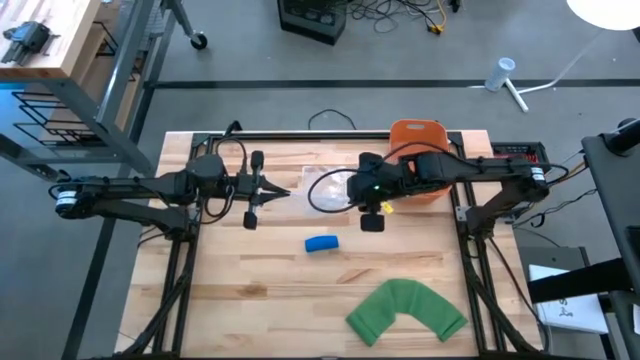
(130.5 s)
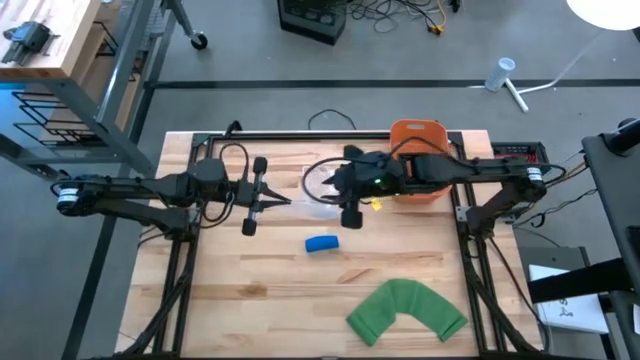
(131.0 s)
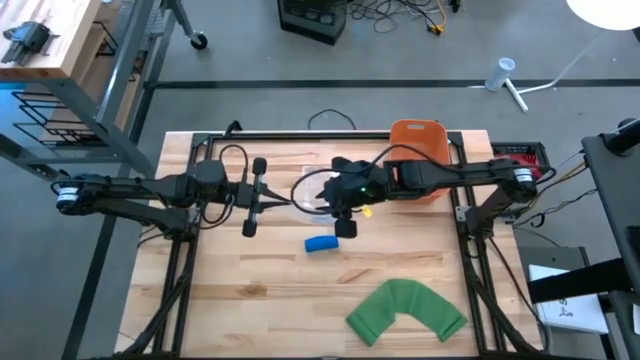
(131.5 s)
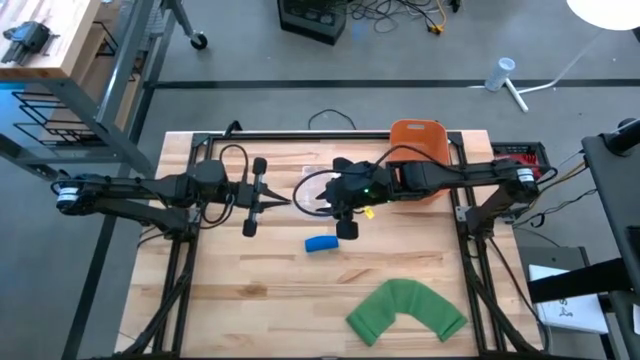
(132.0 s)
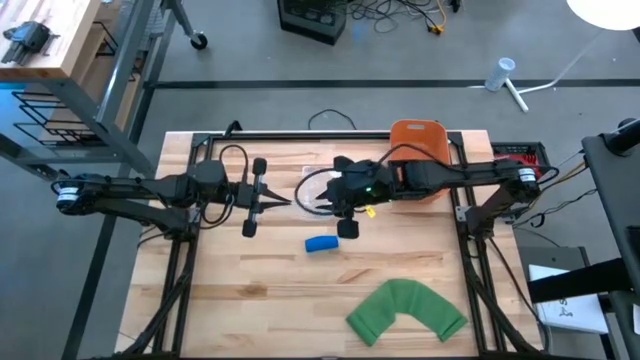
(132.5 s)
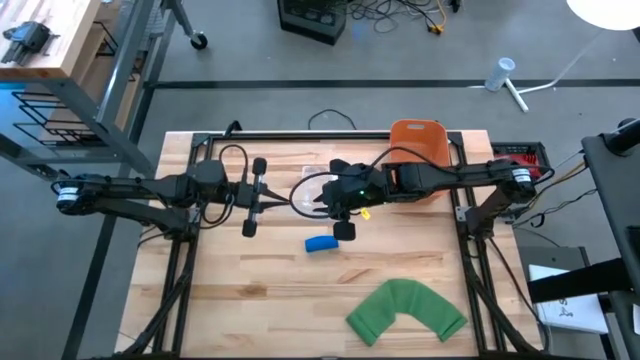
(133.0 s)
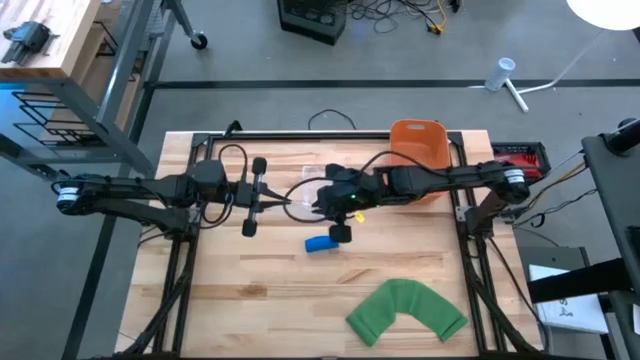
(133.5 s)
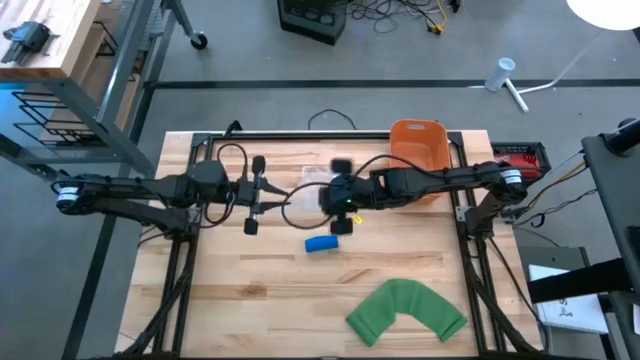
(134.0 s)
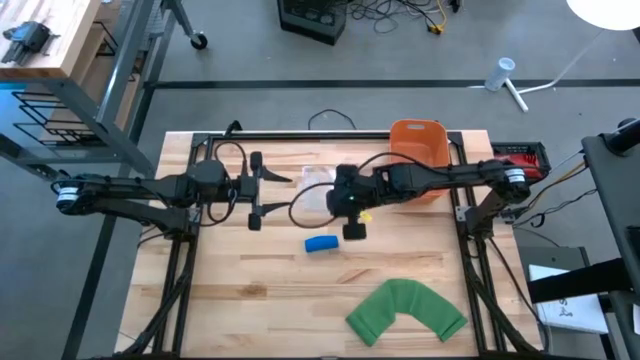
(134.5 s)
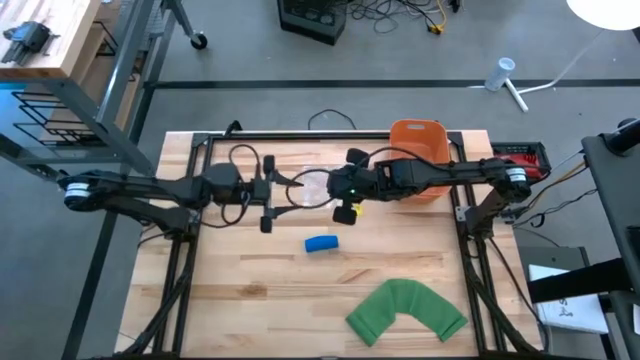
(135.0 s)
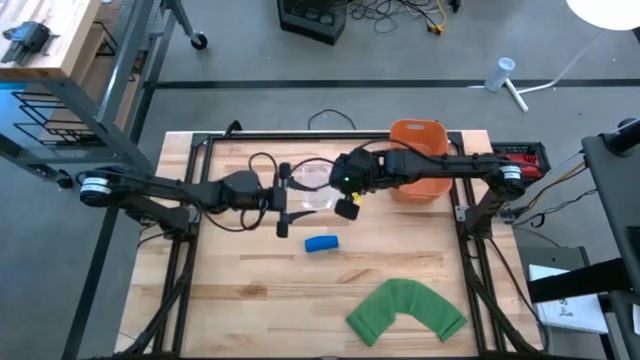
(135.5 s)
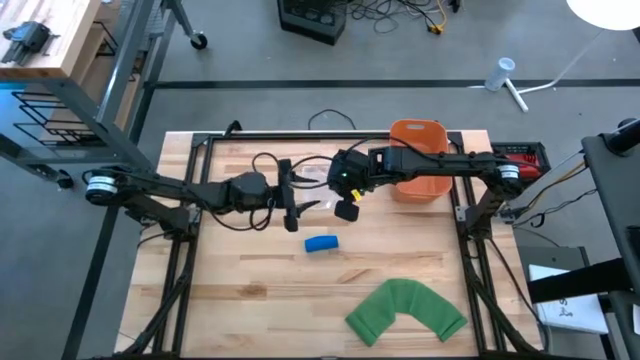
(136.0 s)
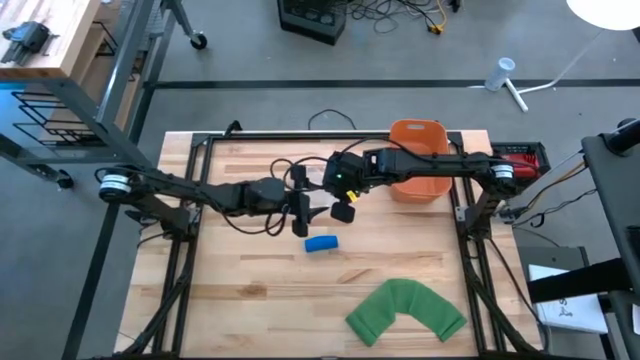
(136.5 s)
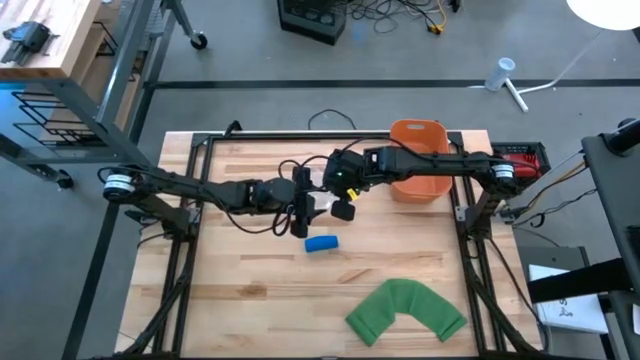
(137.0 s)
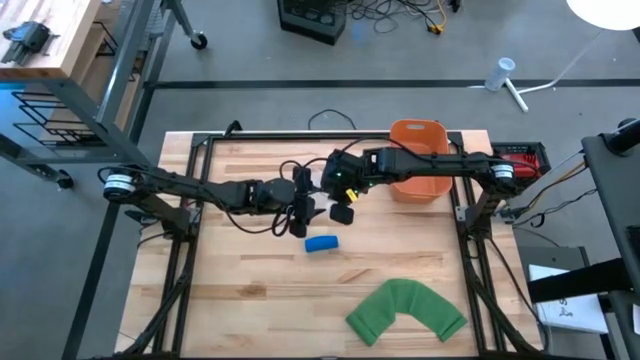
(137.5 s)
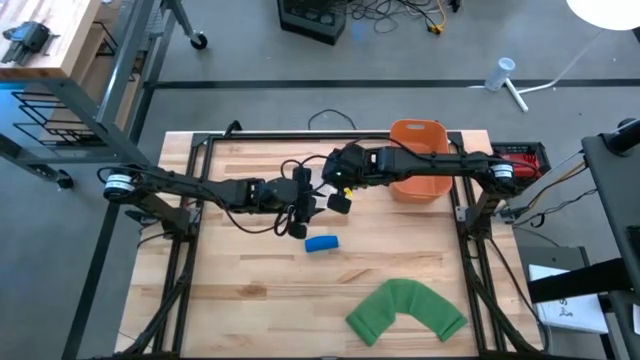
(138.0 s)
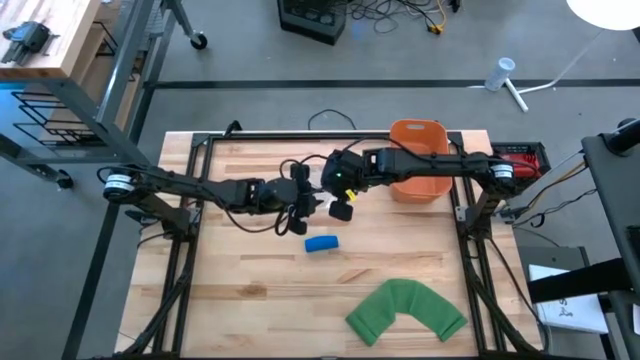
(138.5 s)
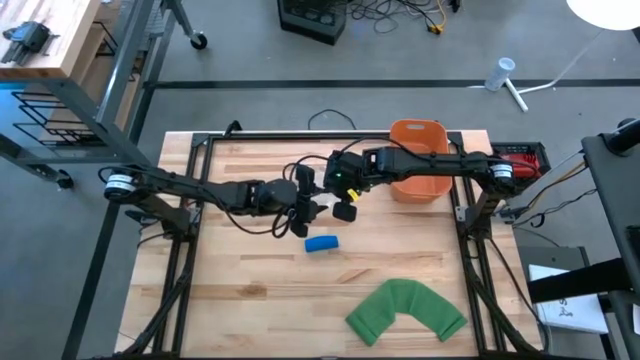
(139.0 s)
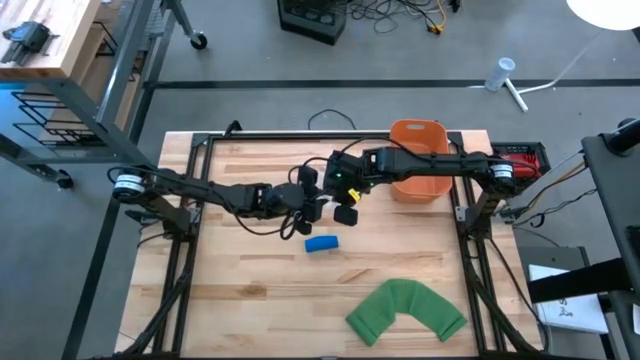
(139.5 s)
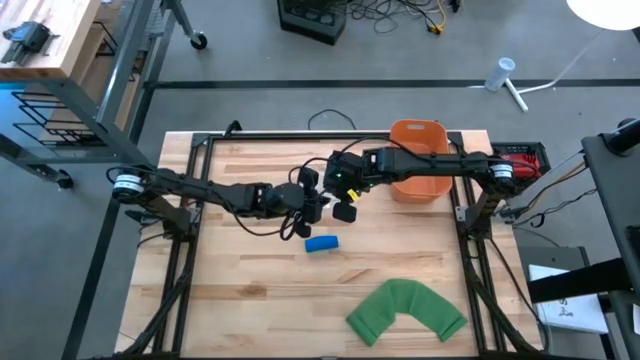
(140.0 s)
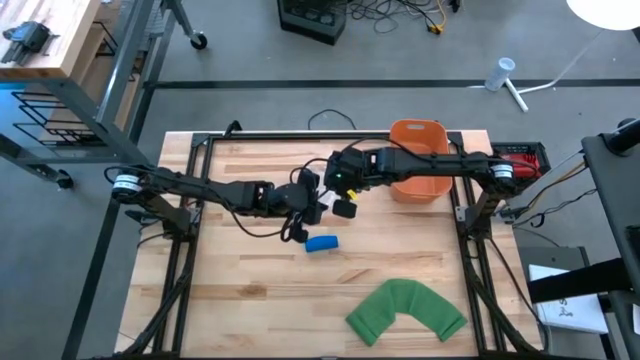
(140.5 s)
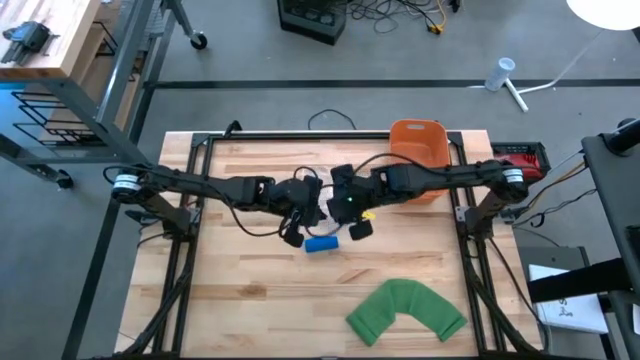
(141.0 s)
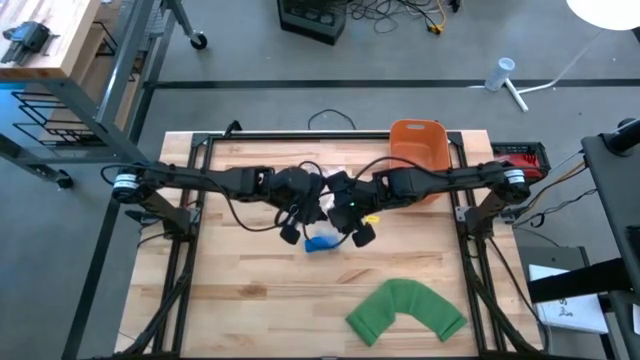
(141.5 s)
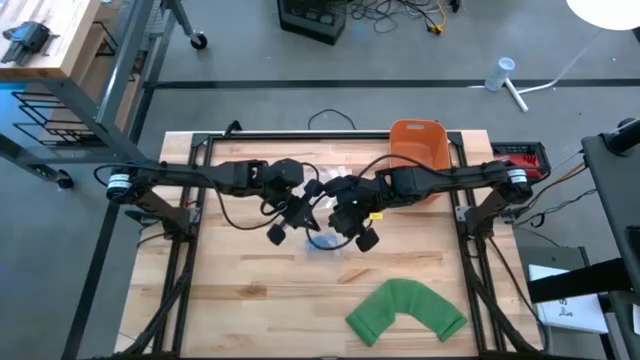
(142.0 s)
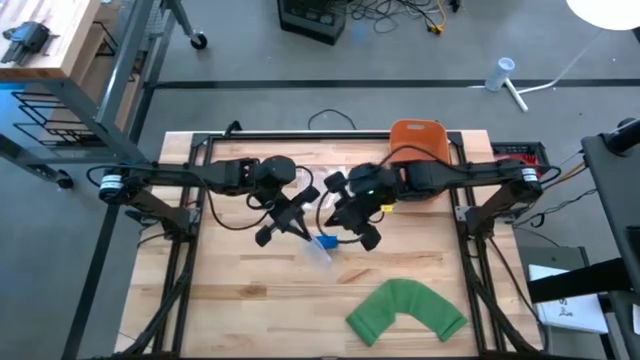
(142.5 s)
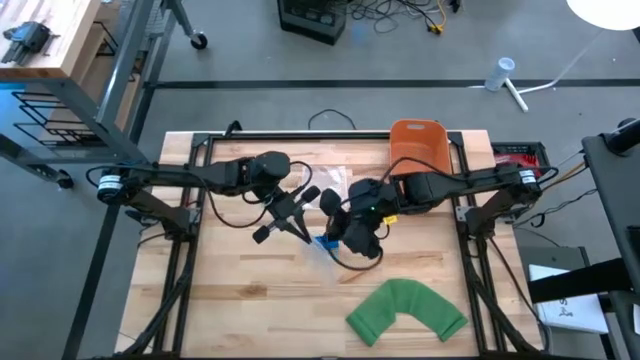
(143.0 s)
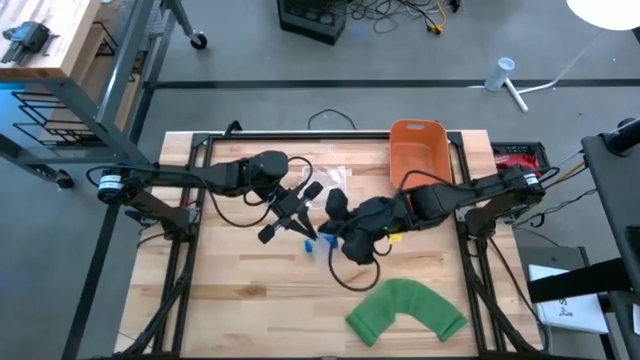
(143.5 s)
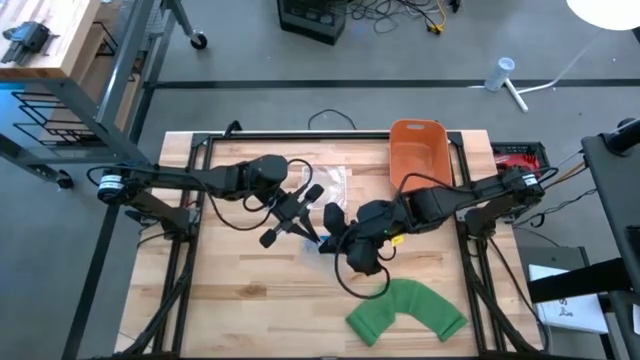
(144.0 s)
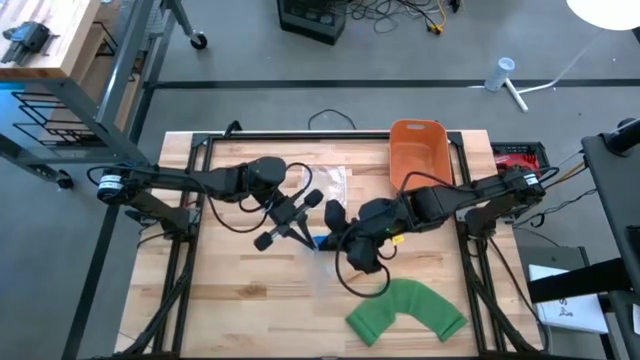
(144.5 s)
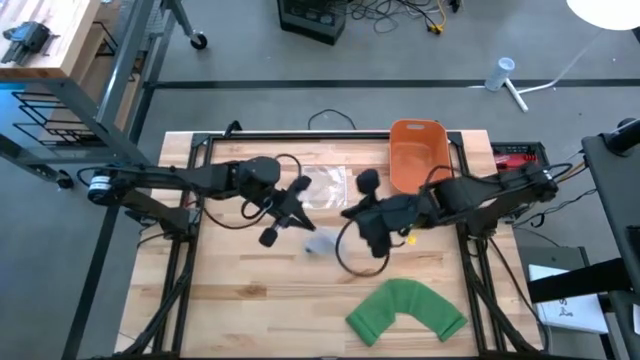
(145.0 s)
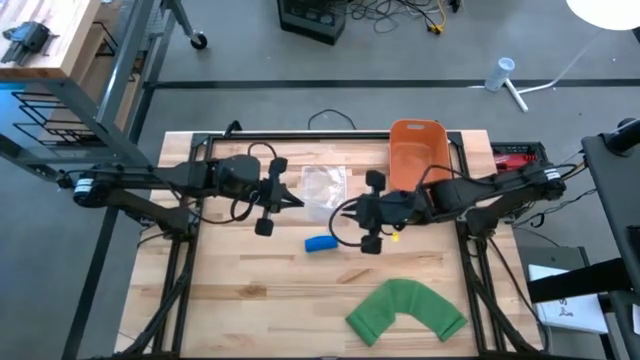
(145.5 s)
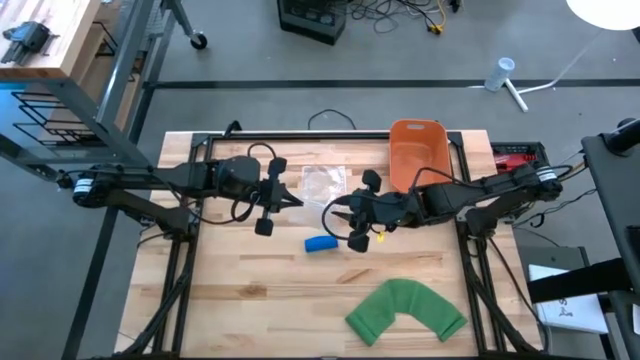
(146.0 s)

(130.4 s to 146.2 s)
Task: Roll bandage
Put the blue rolled bandage into the zip lock

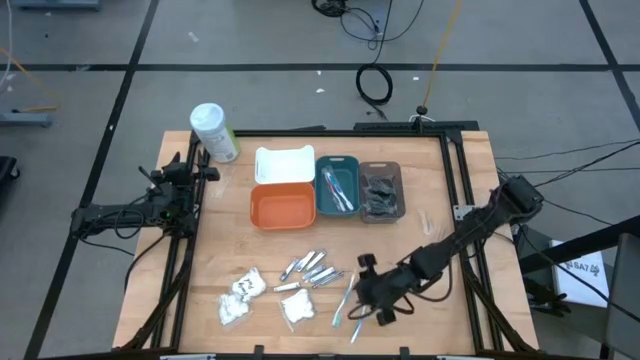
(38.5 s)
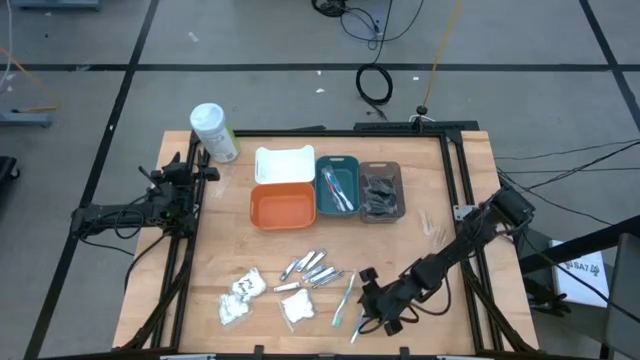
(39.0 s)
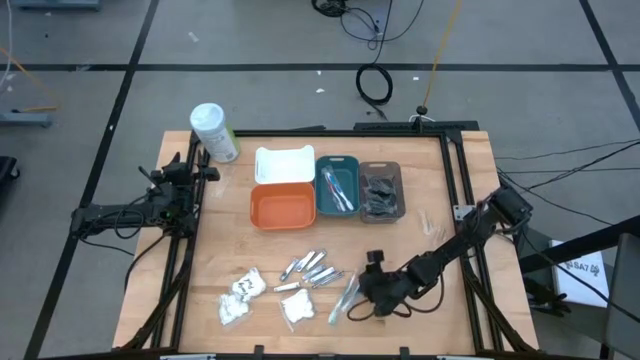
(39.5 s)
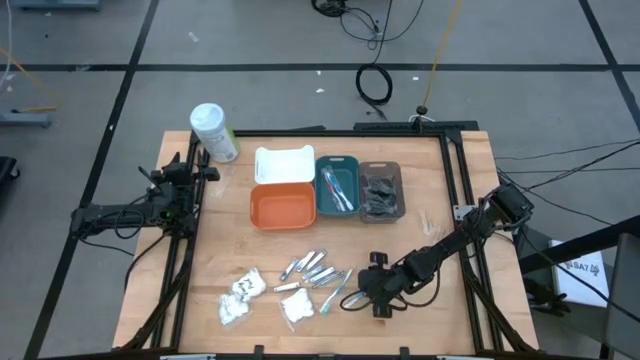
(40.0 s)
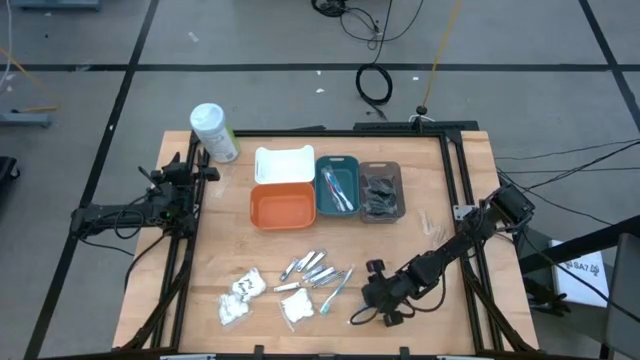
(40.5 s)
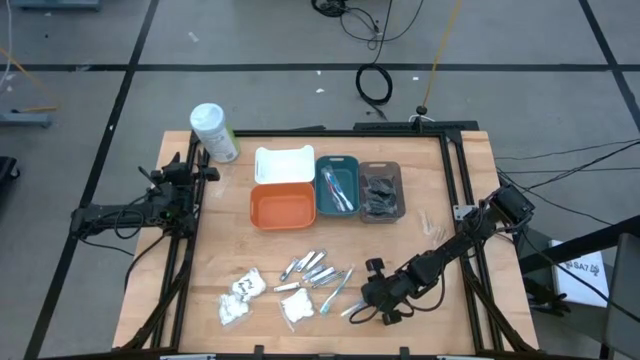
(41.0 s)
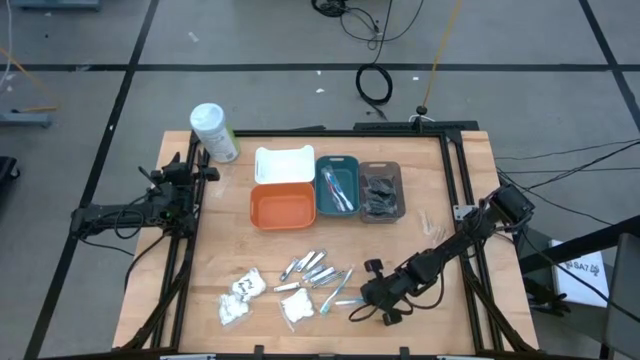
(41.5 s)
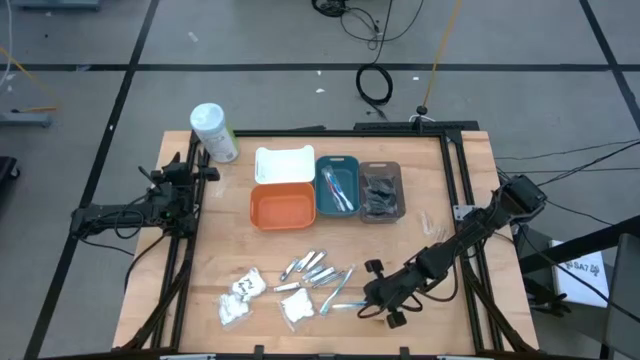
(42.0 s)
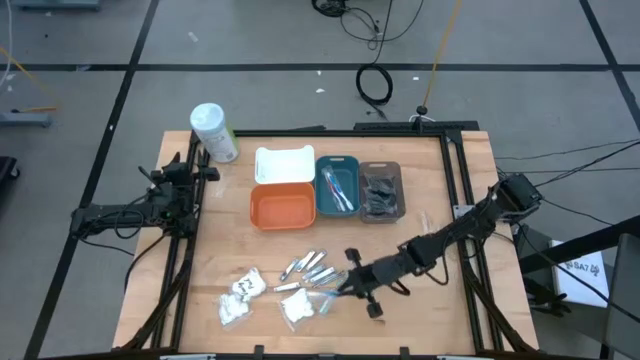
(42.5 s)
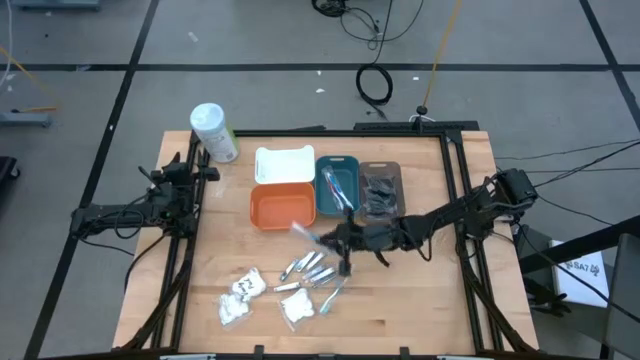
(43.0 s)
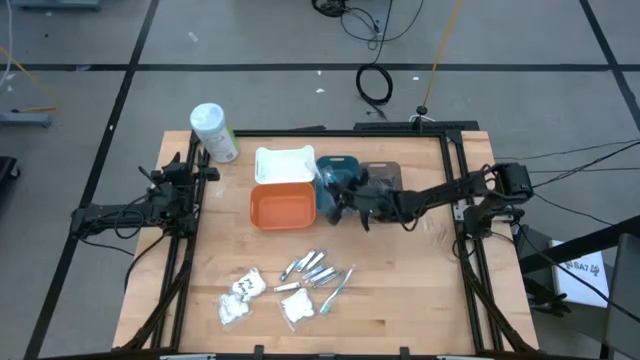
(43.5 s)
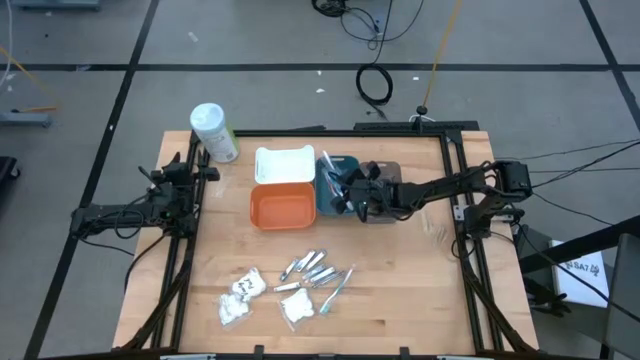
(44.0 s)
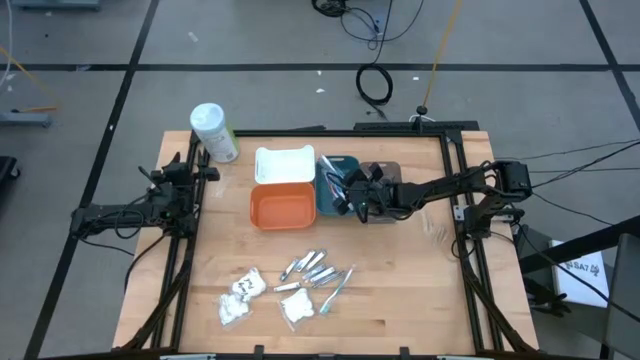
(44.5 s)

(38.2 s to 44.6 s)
Task: Pick & Place Travel size toiletries
Put the blue toothbrush into the dark green bin
